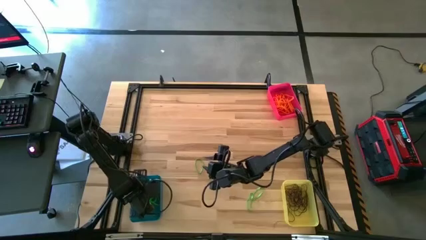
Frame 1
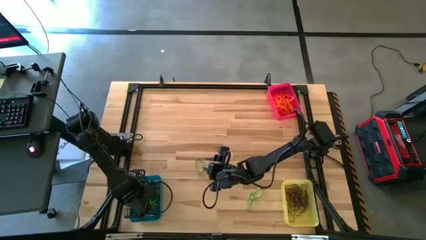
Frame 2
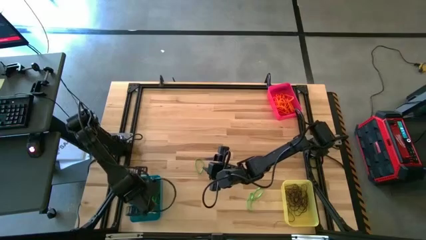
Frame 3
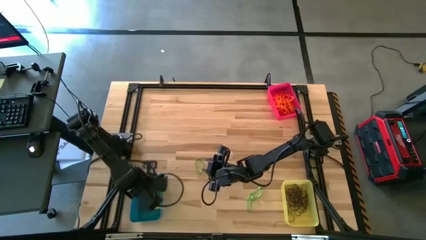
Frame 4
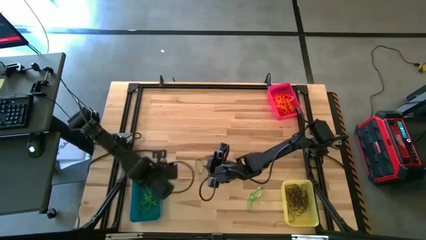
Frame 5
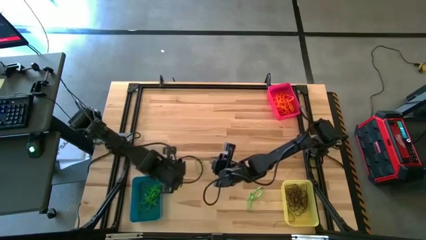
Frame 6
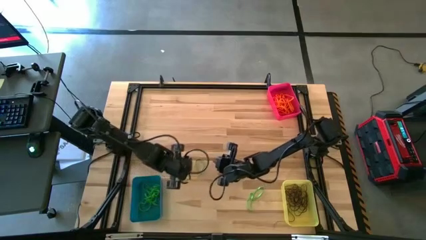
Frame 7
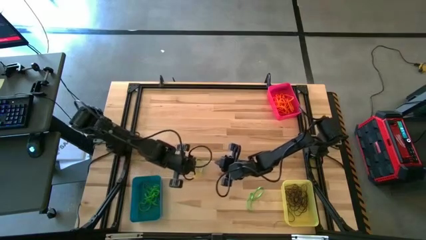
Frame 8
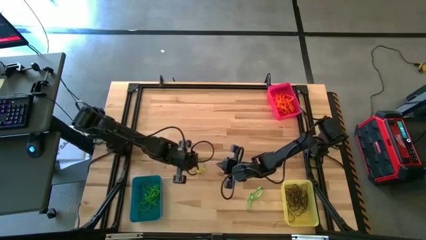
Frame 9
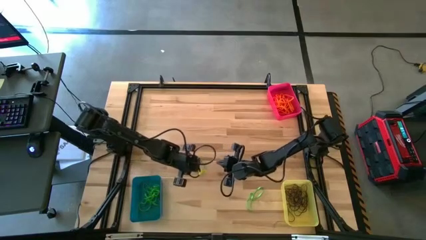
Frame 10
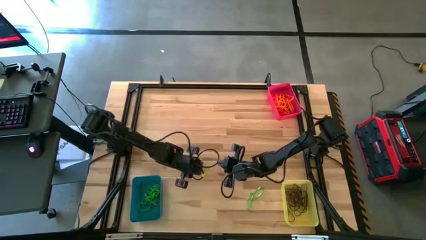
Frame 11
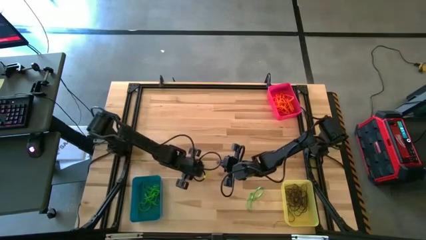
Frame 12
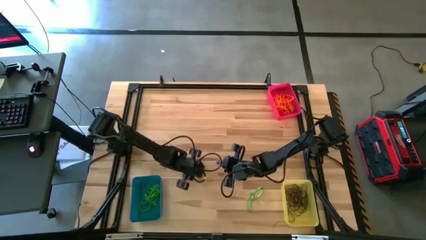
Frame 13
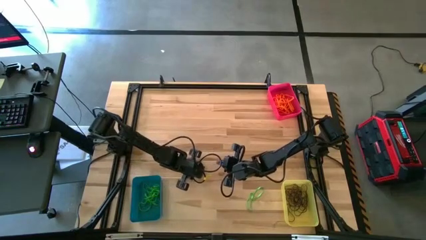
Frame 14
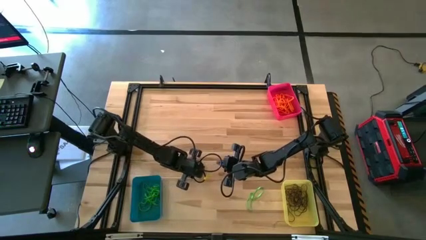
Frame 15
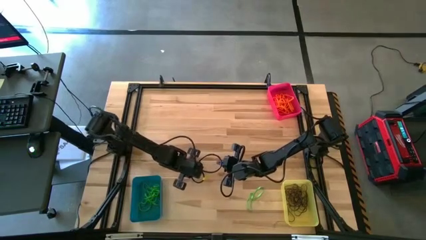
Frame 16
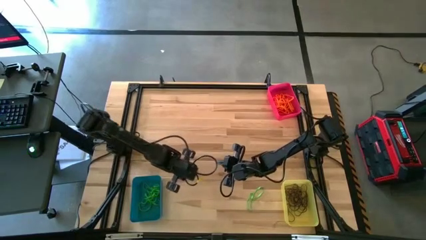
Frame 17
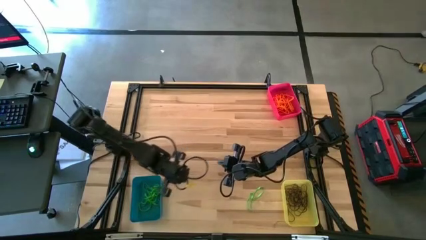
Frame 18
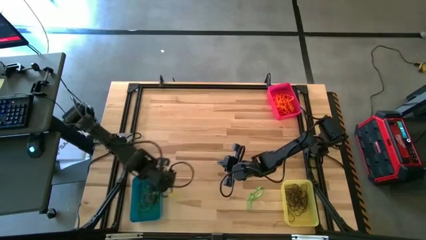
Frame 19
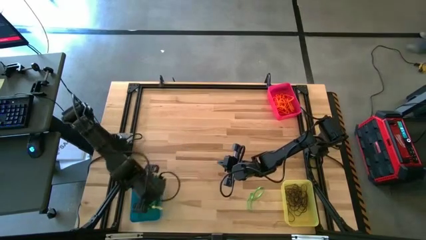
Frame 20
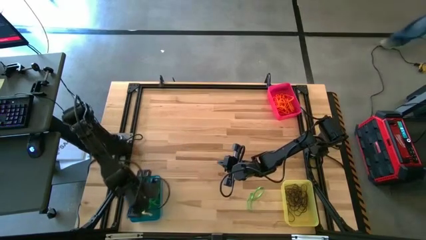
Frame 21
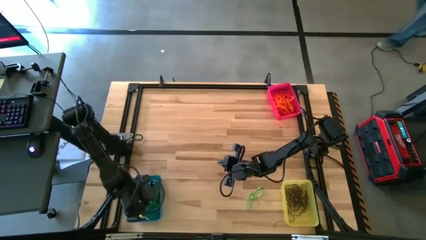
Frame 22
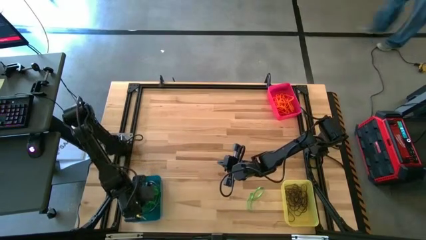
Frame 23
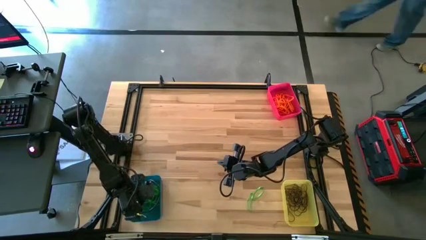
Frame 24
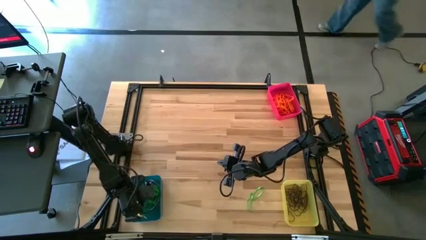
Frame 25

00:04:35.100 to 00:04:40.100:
Task: Sort rubber bands into baskets
Put the green rubber band into the blue bin

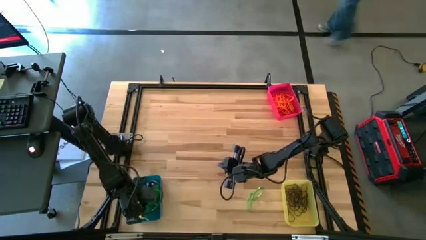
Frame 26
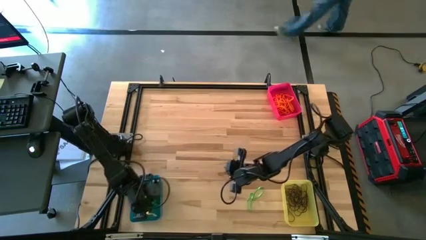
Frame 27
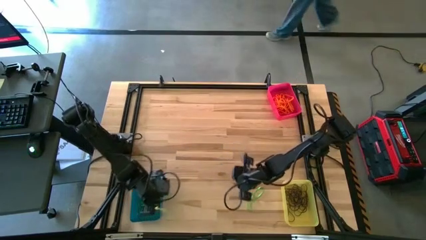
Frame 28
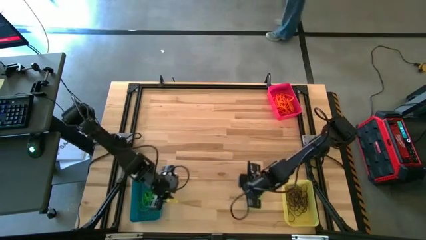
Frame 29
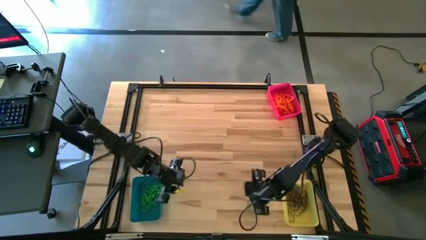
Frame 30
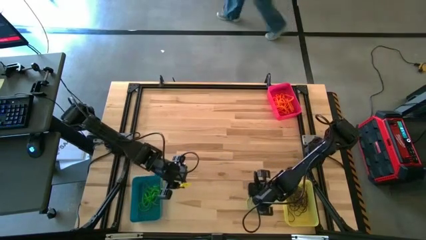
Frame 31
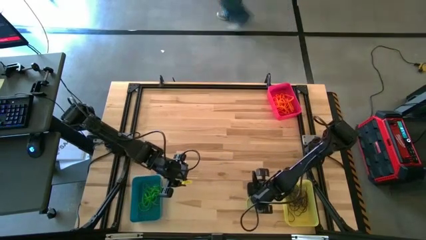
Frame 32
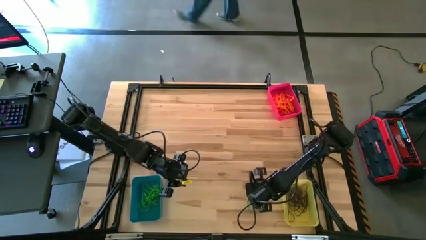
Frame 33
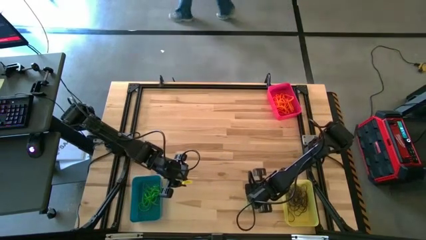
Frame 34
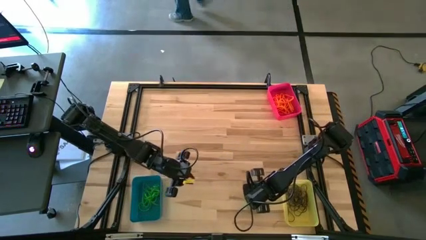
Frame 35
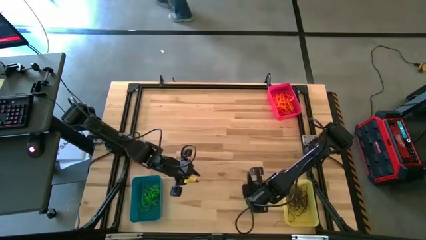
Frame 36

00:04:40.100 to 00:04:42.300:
Put the green rubber band into the blue bin

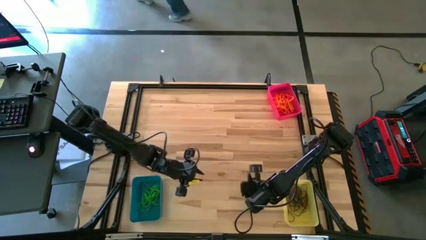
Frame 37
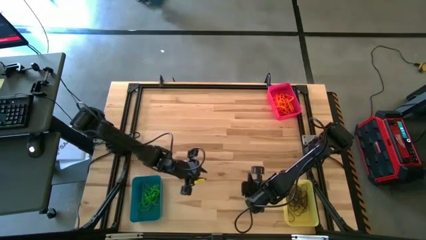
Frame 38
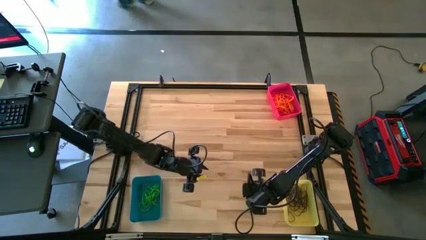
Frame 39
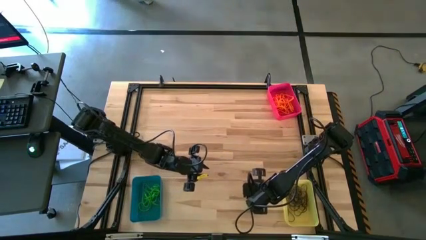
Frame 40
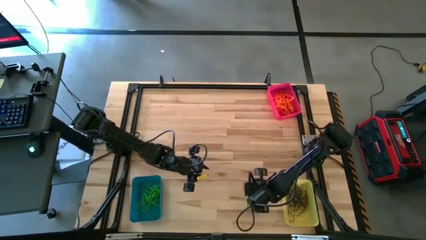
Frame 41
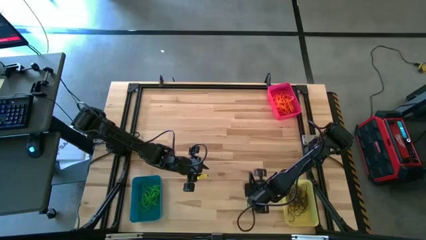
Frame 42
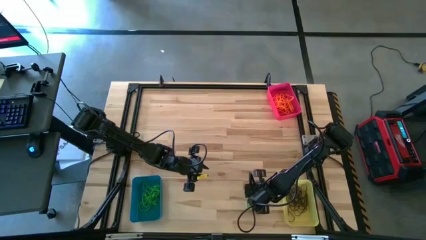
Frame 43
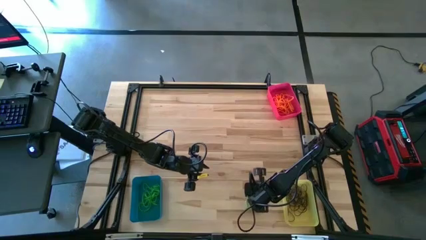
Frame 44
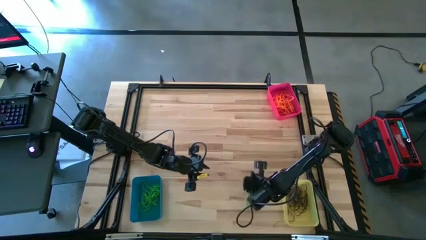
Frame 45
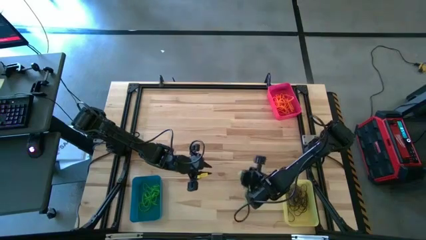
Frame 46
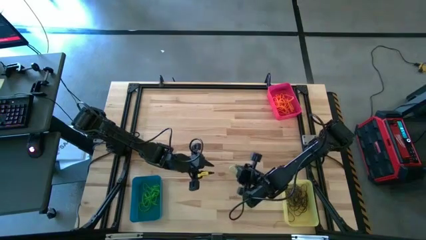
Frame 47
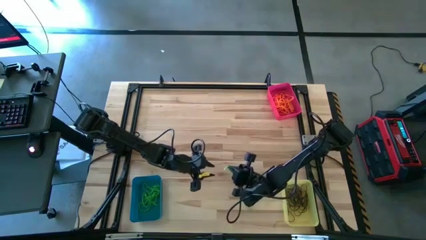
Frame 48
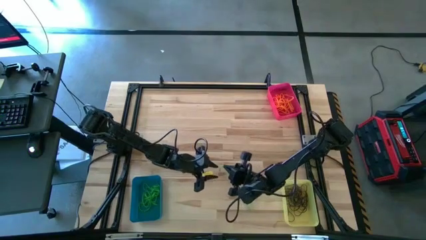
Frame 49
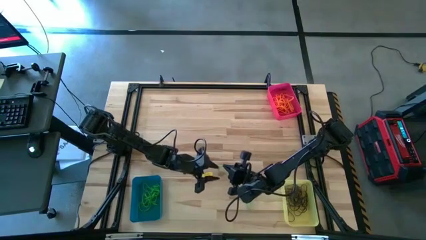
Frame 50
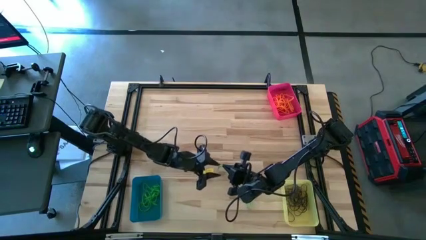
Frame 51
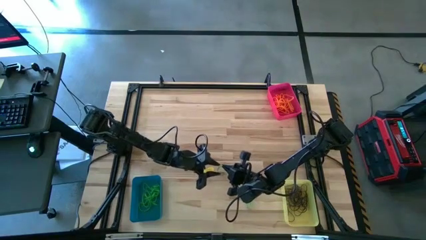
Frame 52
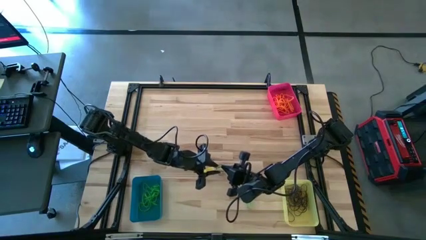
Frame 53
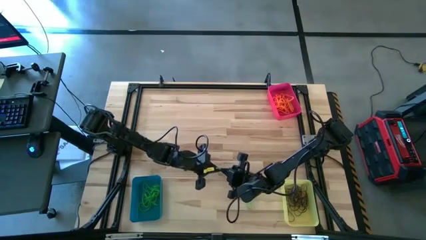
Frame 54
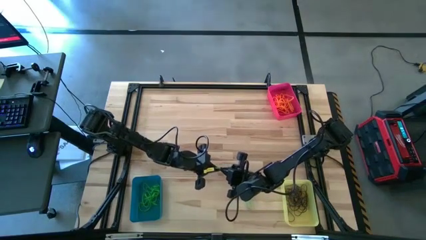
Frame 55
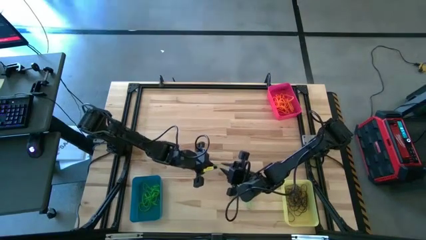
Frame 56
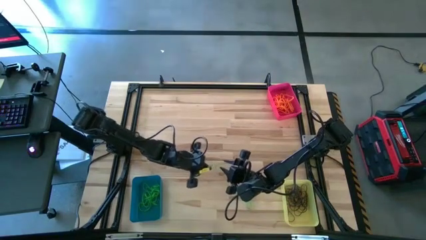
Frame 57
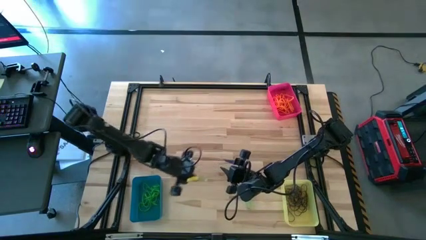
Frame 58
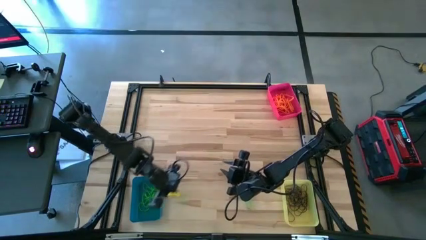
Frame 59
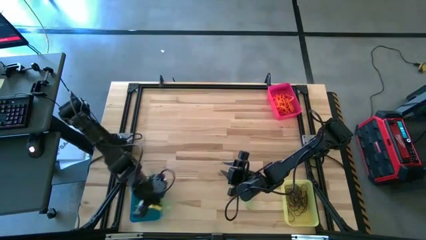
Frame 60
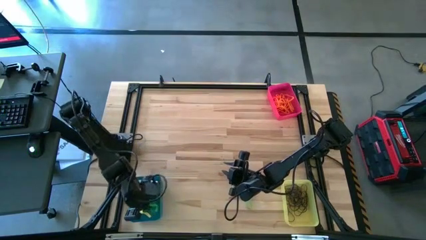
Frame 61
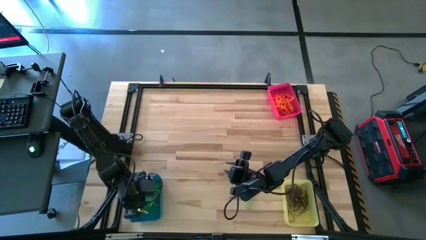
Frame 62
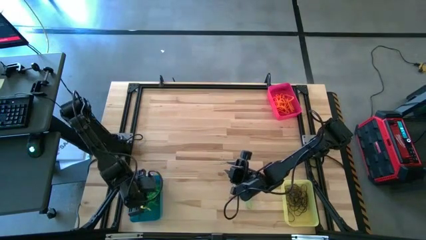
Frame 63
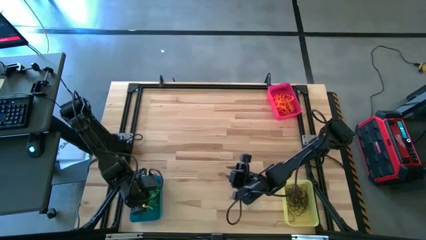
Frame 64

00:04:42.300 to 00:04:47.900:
Put the green rubber band into the blue bin

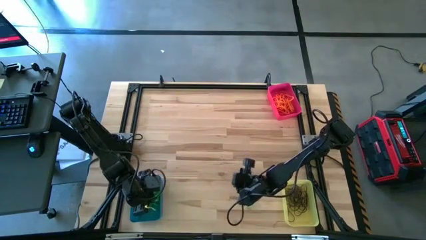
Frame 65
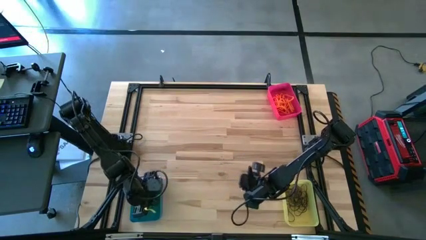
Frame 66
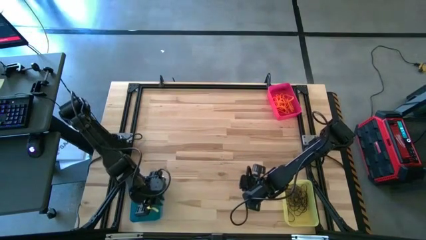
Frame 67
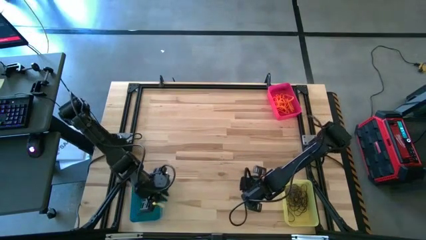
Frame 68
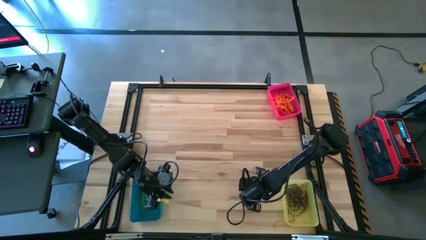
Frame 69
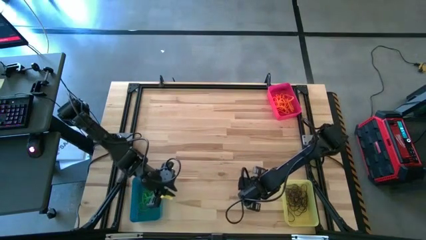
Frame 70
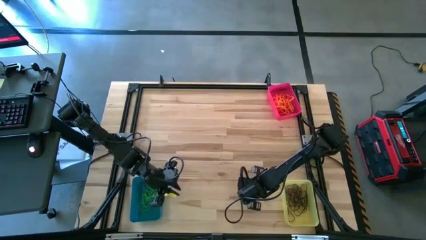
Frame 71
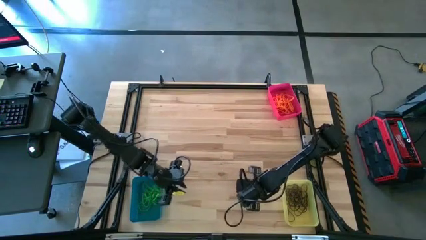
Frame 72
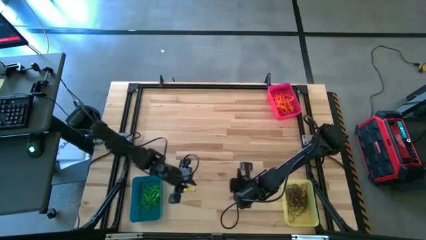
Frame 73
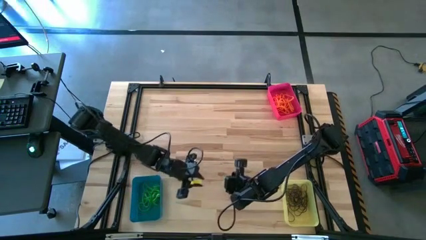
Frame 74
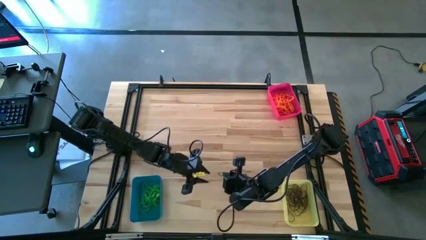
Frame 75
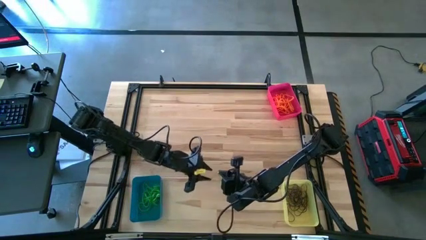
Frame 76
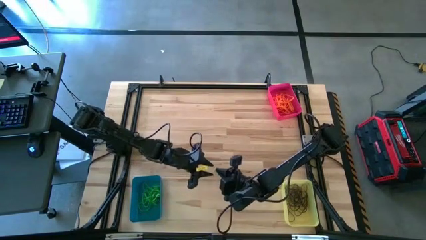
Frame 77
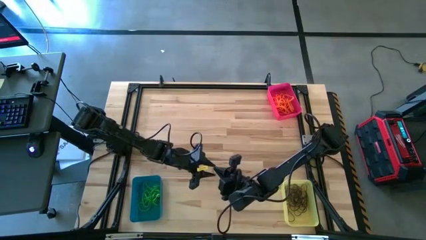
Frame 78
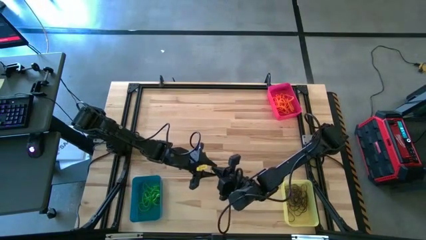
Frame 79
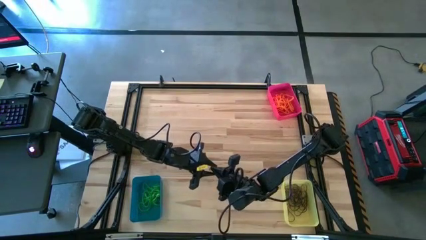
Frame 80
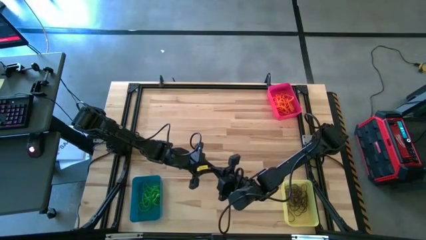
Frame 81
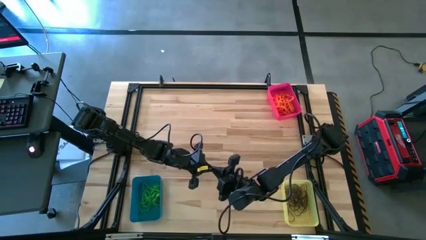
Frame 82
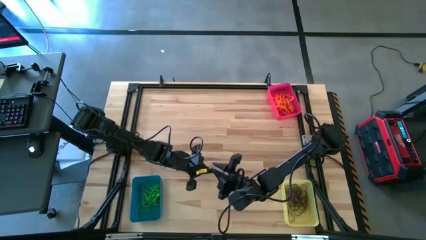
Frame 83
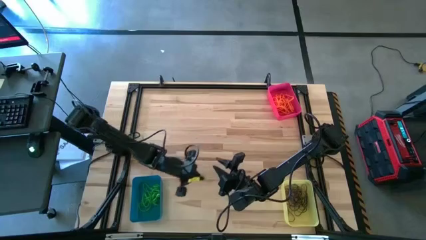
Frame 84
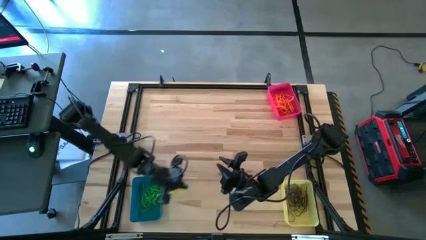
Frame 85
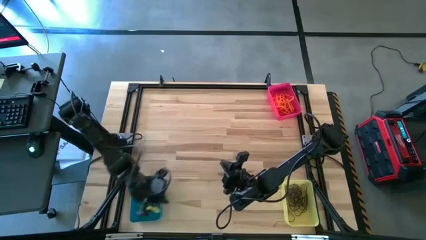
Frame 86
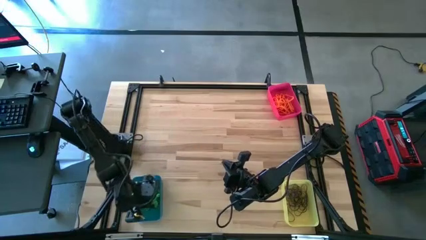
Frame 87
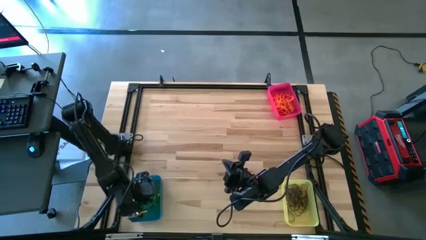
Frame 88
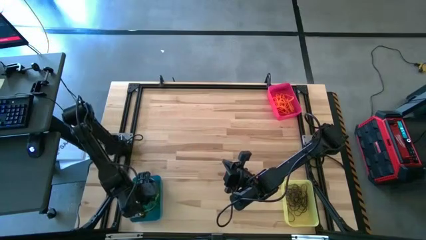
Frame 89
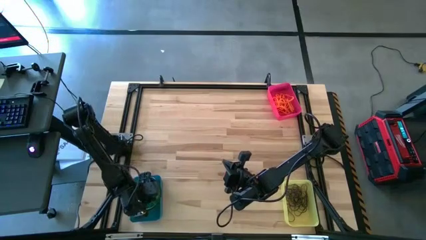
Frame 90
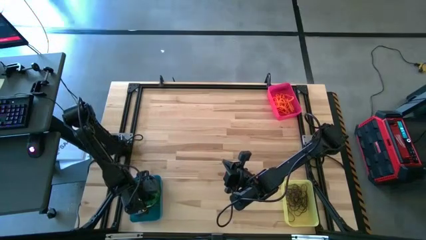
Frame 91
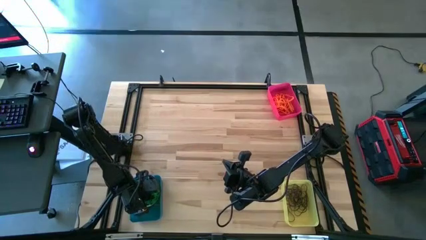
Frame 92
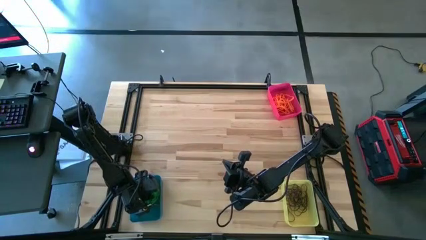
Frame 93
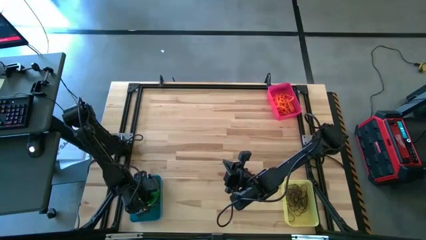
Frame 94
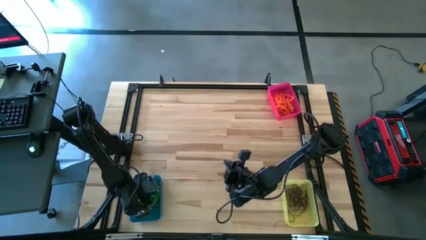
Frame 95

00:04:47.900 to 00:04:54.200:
Put the green rubber band into the blue bin
